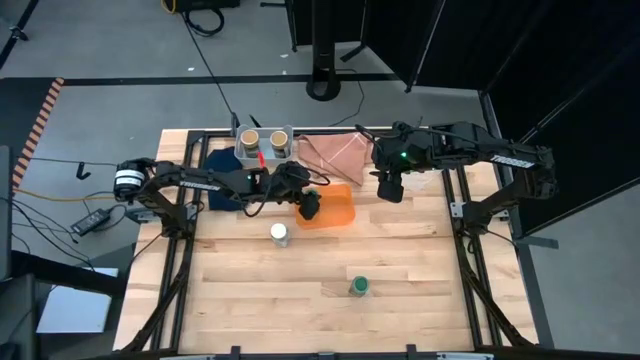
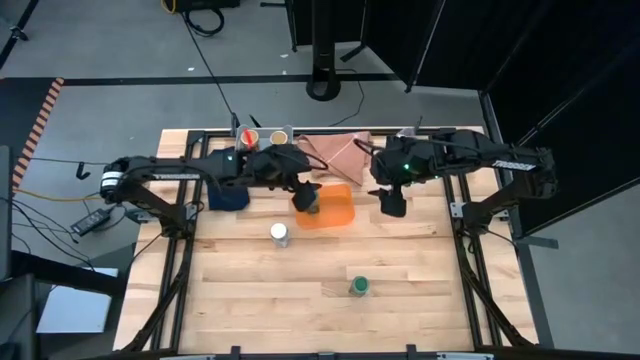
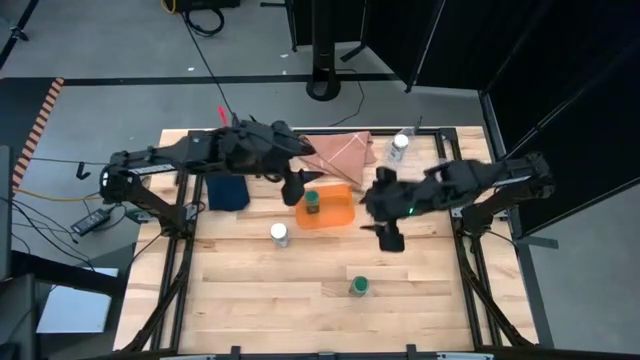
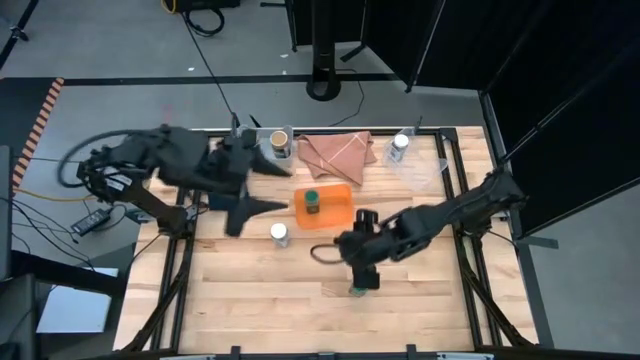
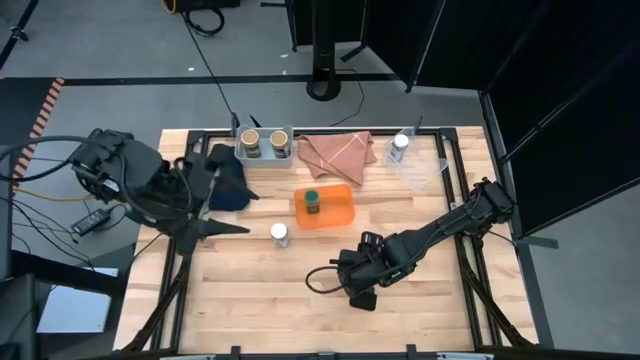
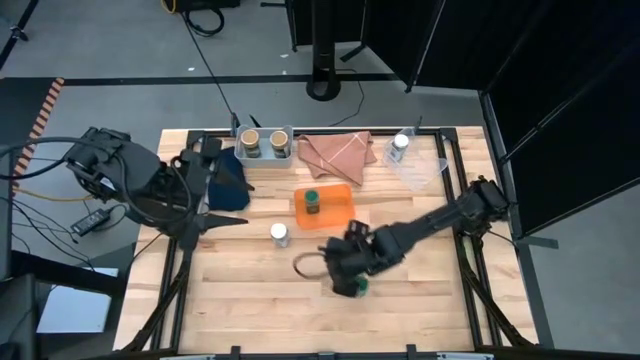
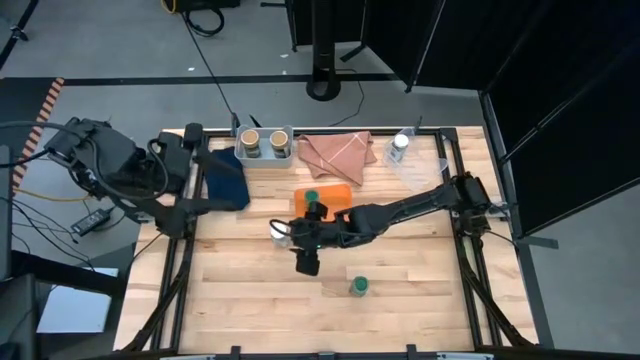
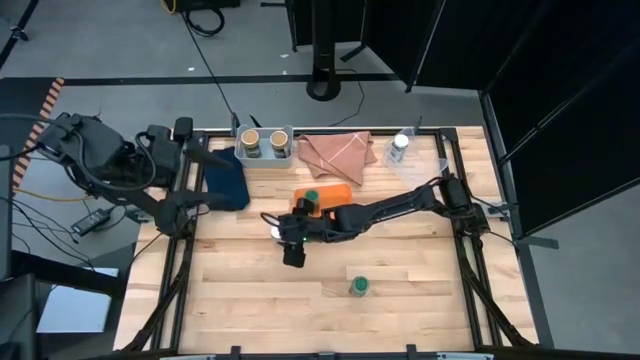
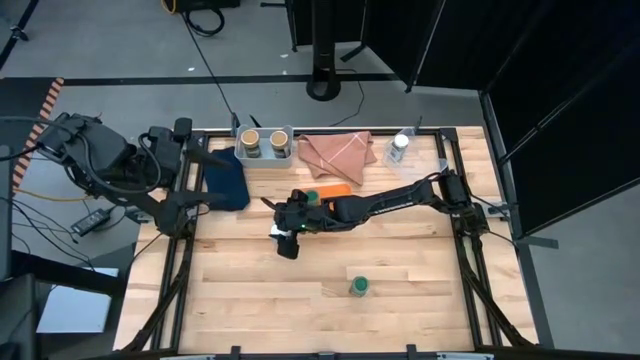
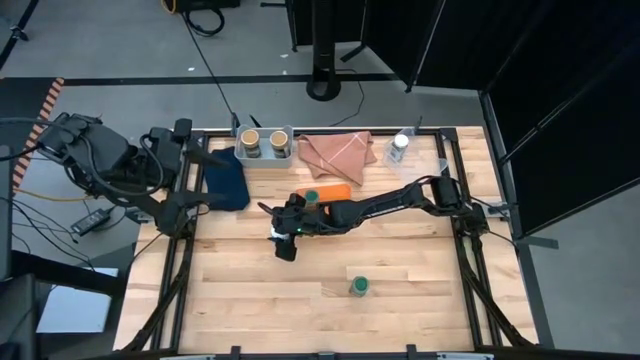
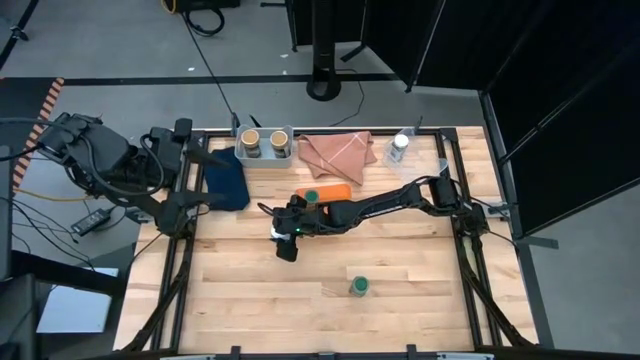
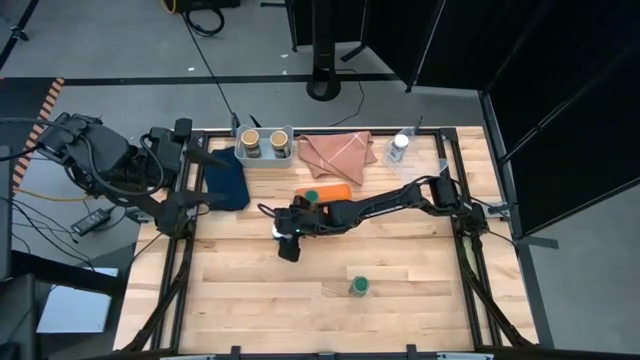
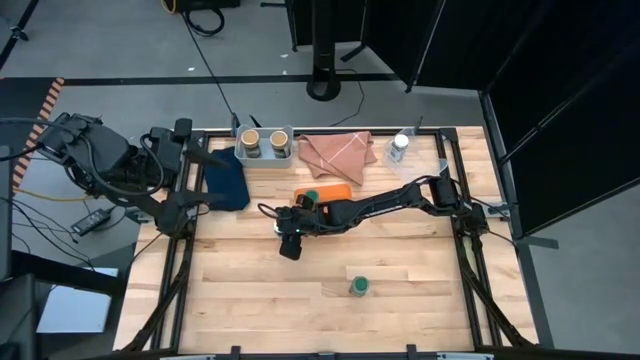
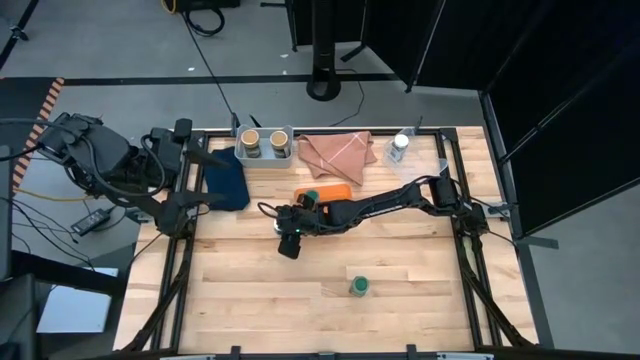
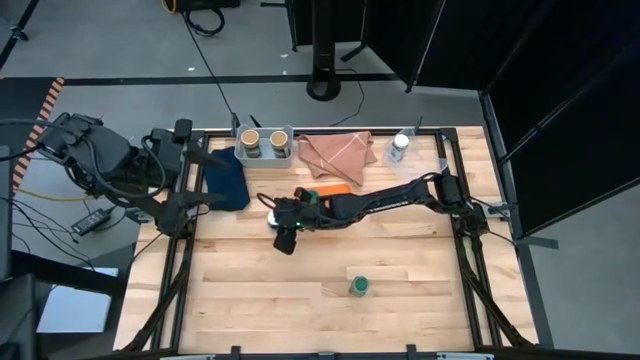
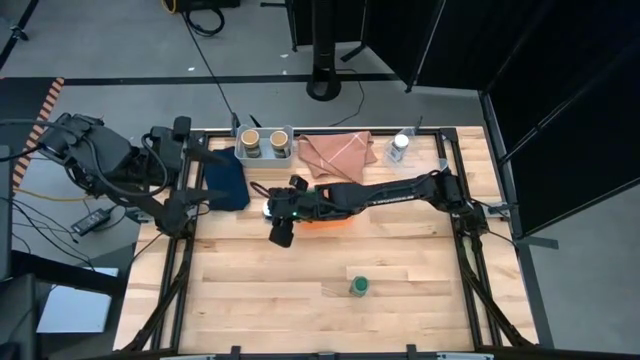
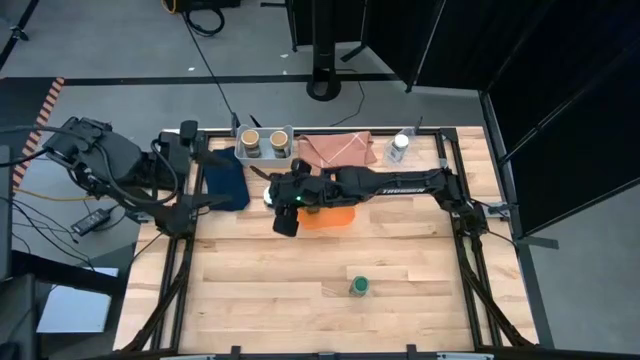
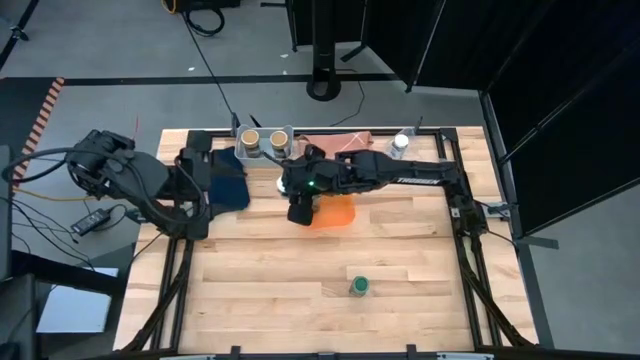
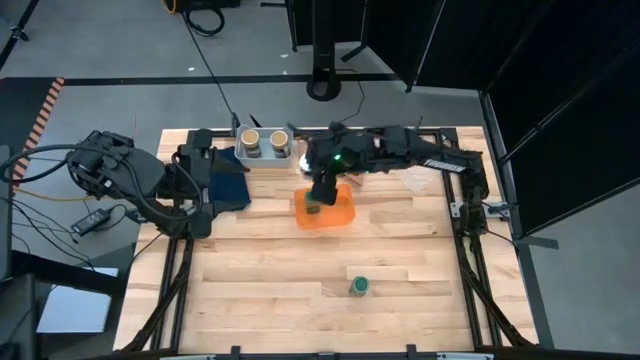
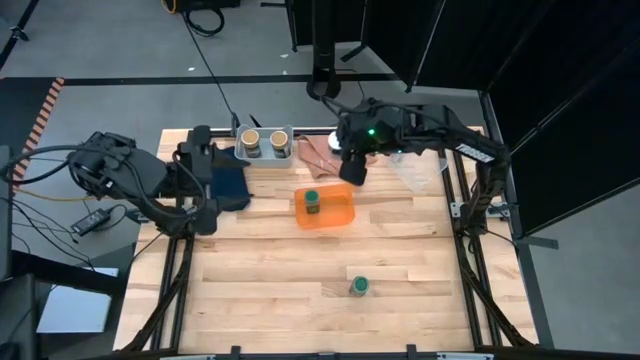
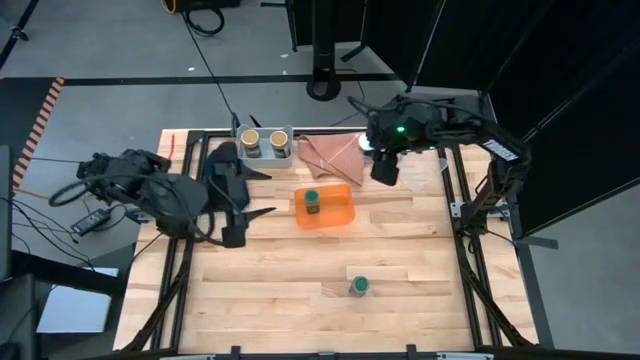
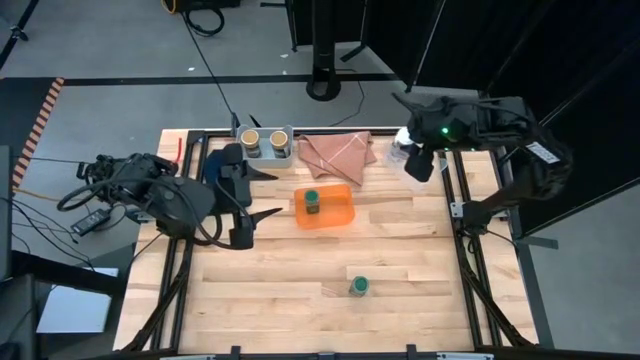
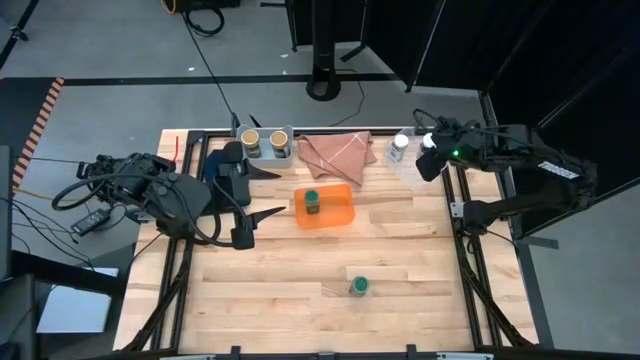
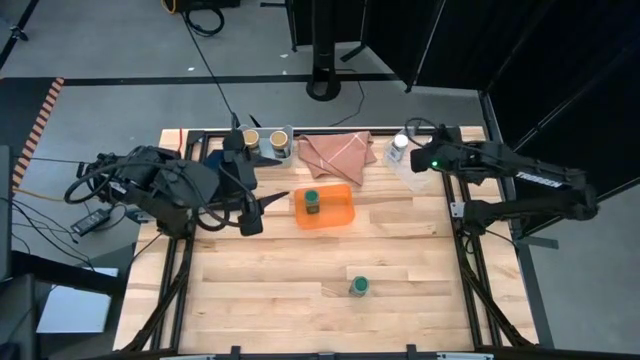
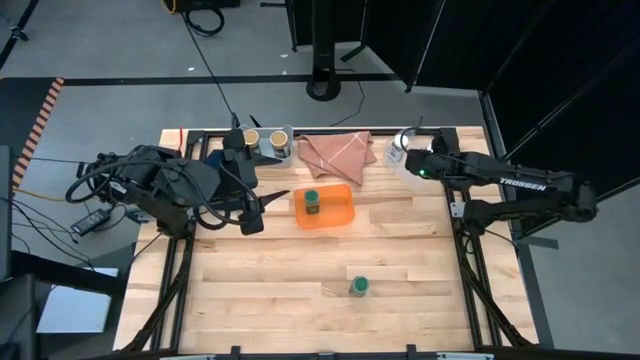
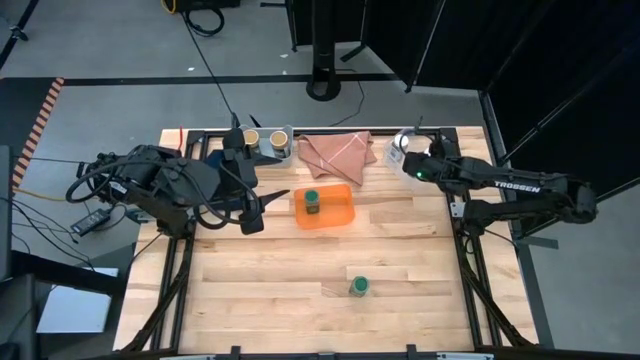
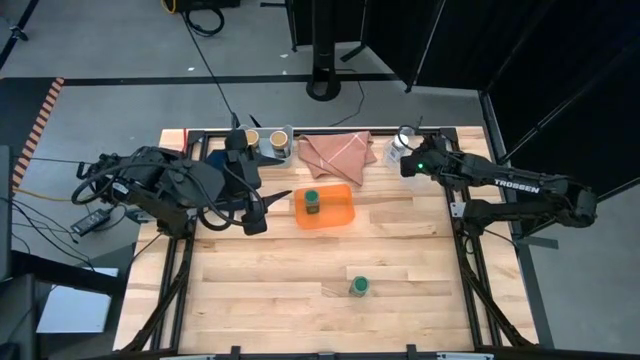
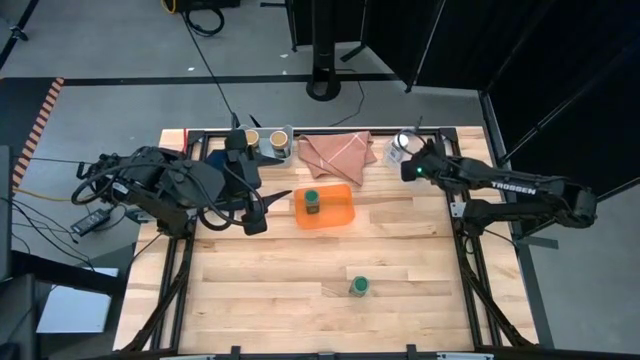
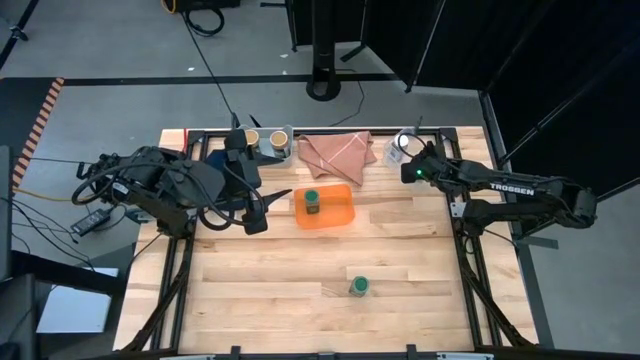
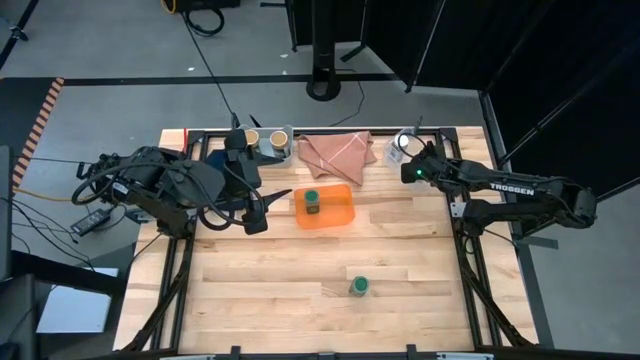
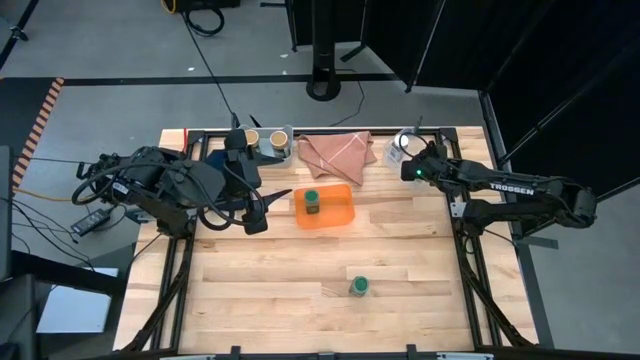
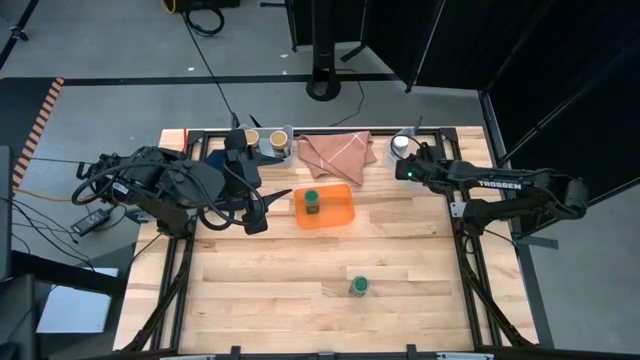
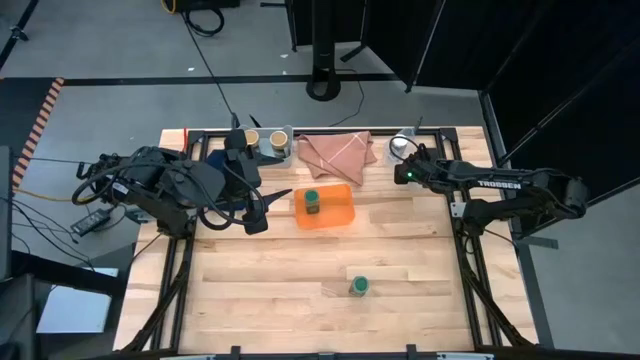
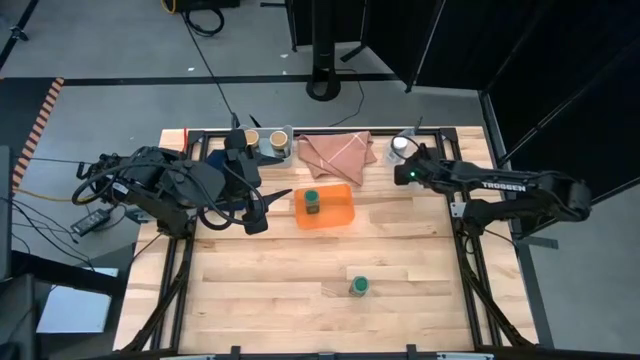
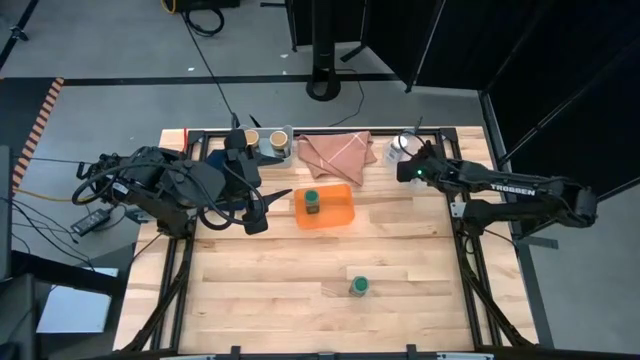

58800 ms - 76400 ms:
Task: Sort spices by type
Put the white seasoning bottle into the transparent bin

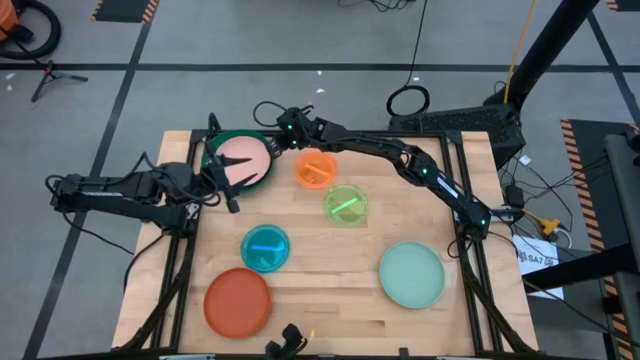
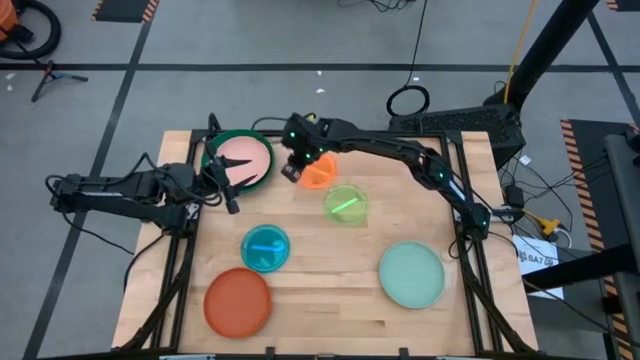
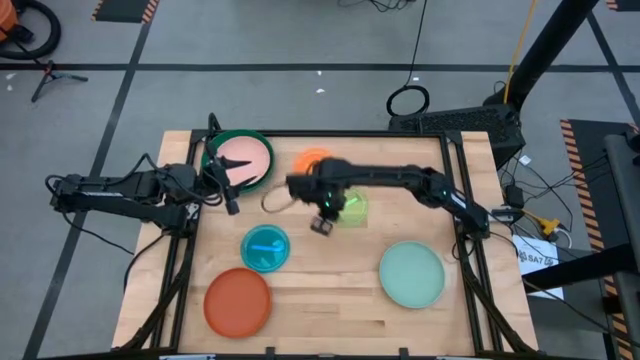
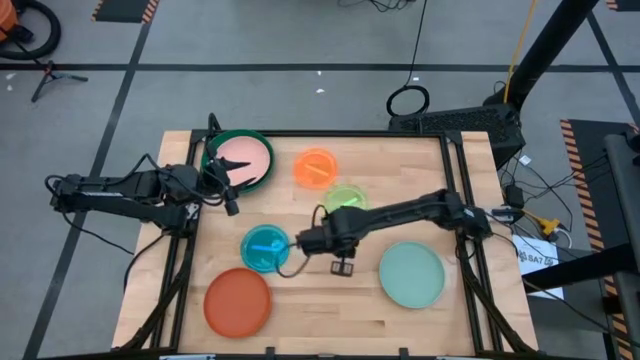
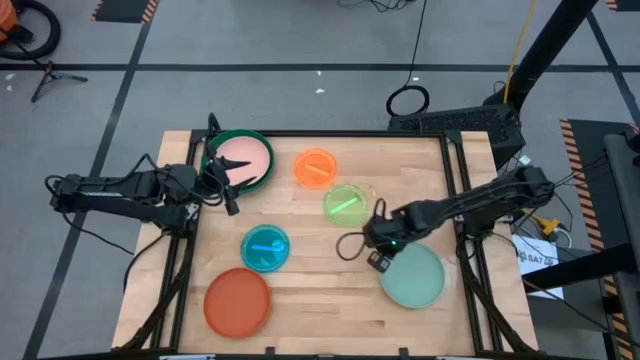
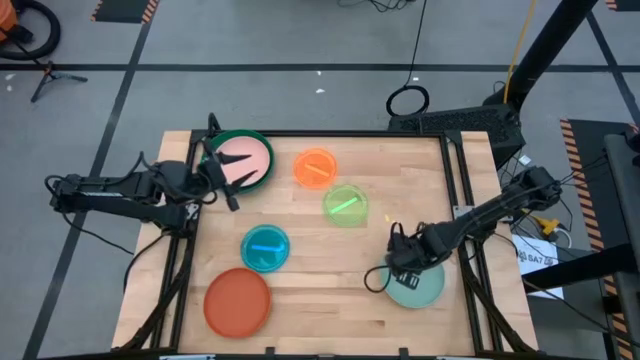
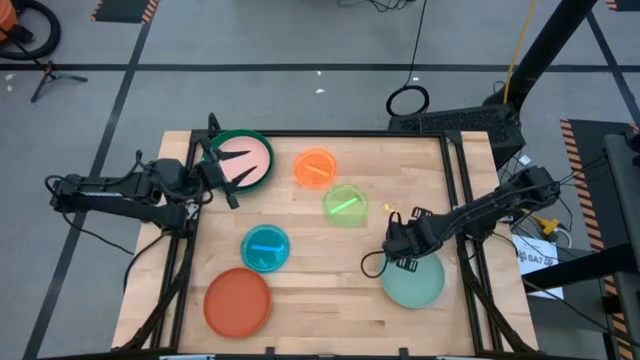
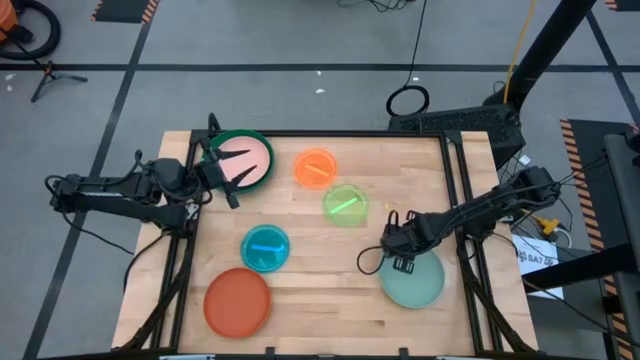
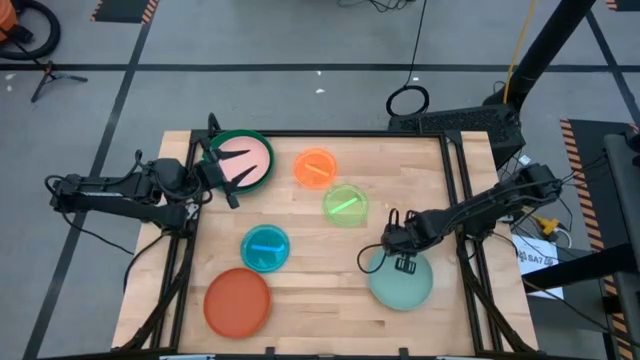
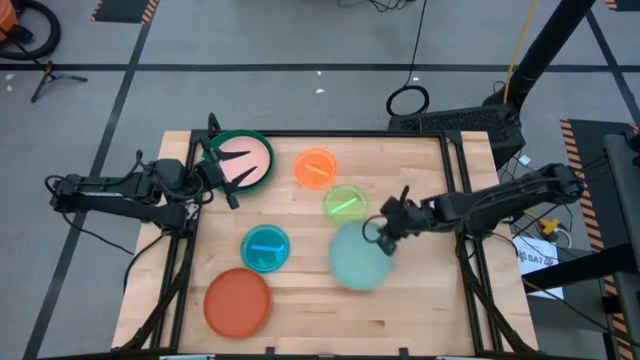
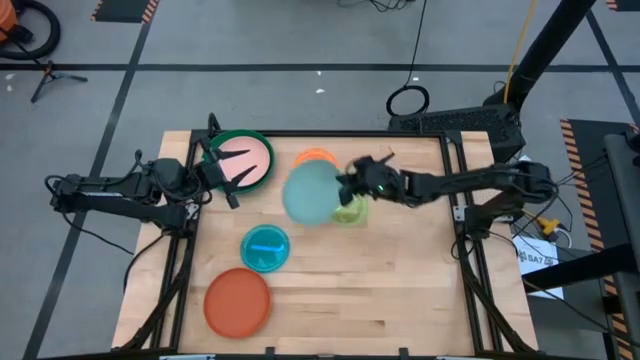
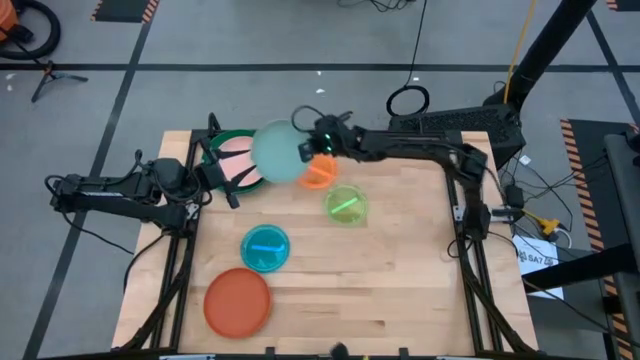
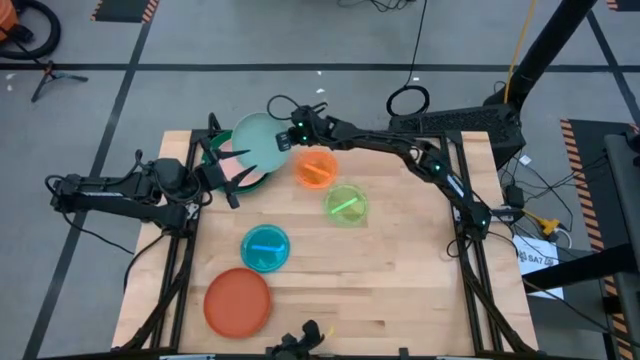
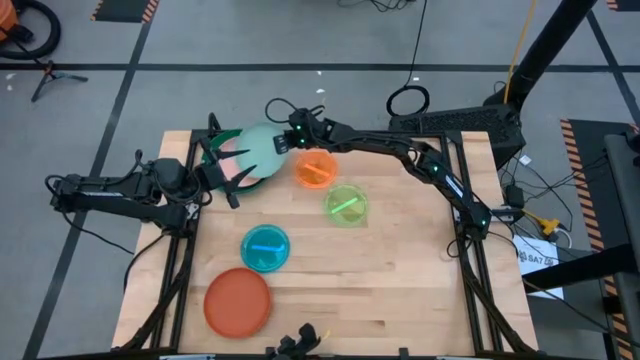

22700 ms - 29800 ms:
Task: Stack plastic plates
Stack the light blue plate on top of the light pink plate
